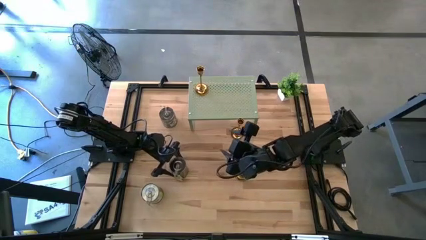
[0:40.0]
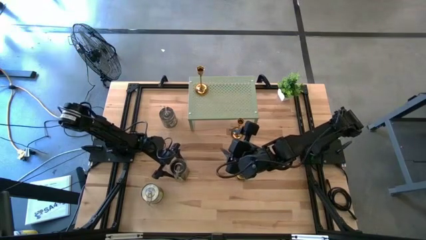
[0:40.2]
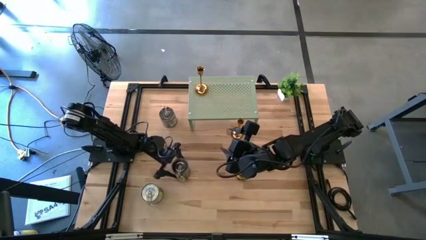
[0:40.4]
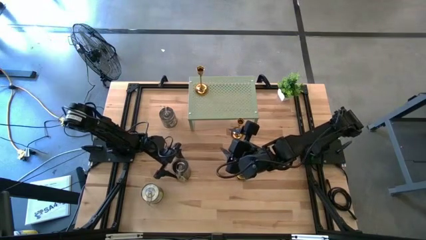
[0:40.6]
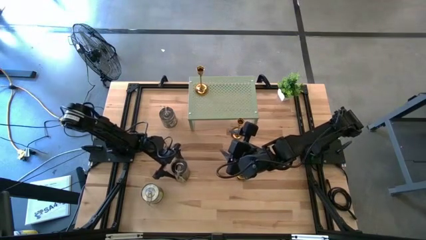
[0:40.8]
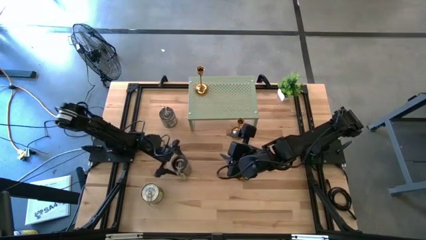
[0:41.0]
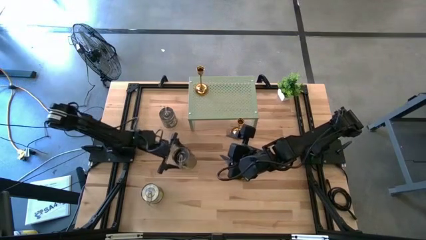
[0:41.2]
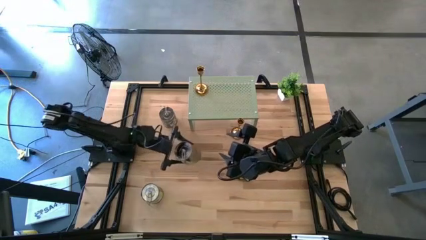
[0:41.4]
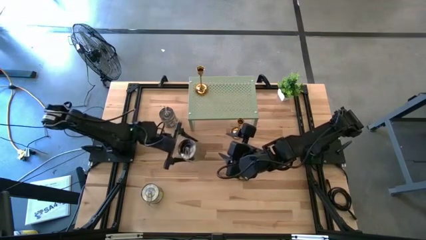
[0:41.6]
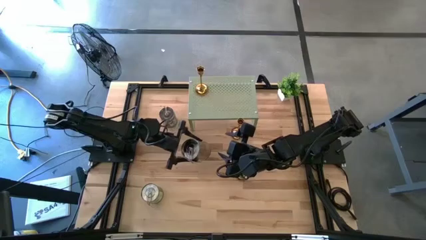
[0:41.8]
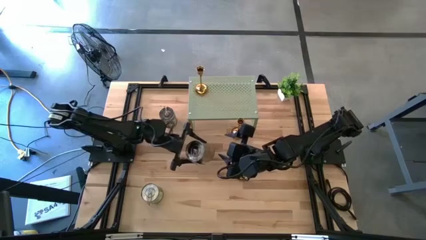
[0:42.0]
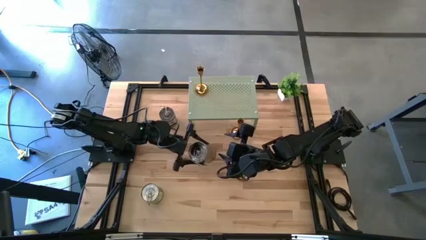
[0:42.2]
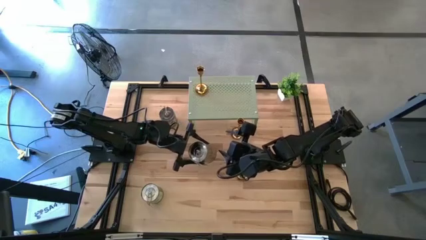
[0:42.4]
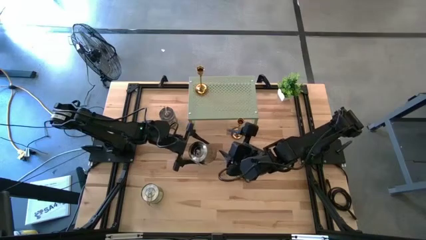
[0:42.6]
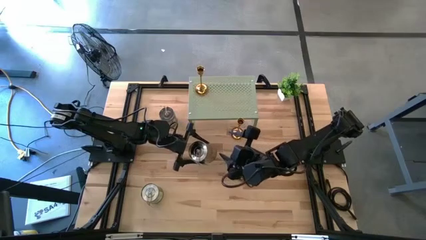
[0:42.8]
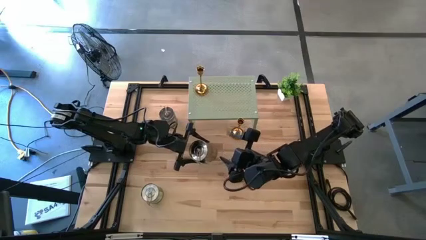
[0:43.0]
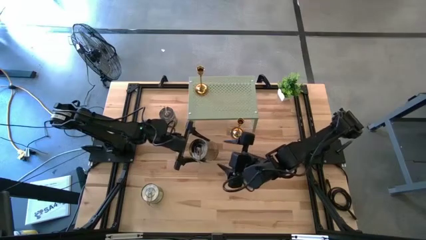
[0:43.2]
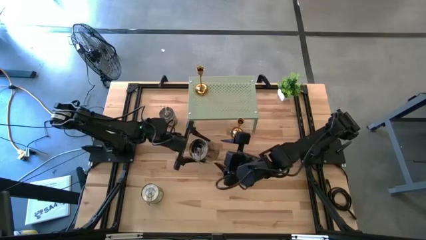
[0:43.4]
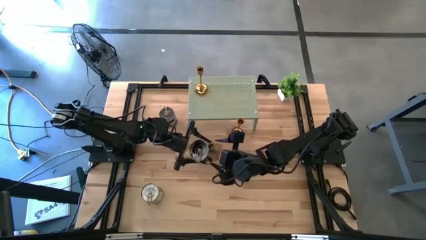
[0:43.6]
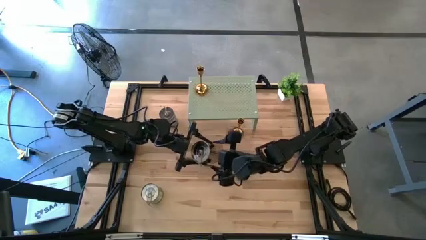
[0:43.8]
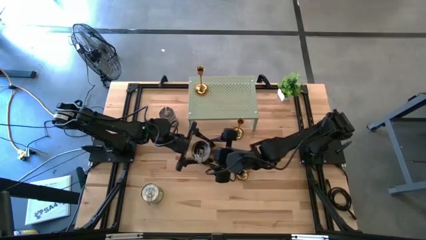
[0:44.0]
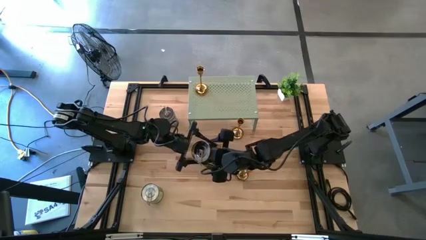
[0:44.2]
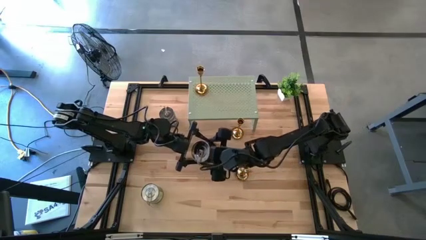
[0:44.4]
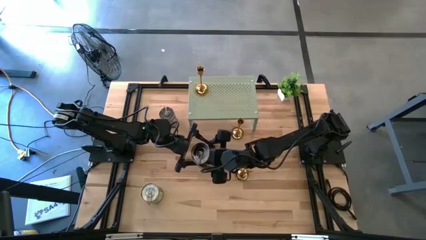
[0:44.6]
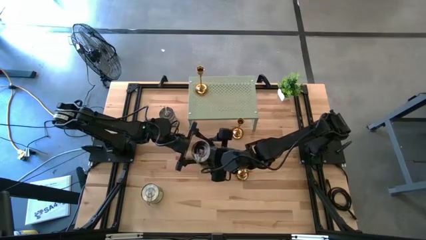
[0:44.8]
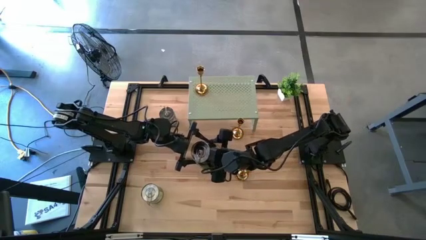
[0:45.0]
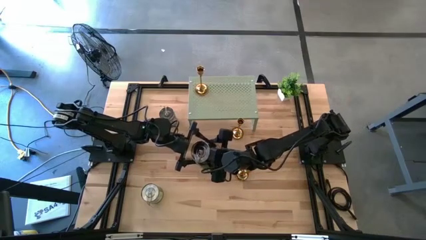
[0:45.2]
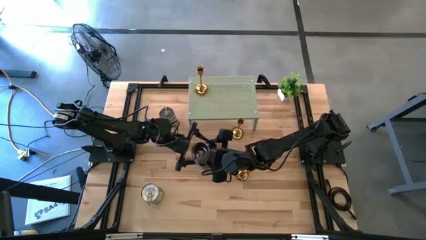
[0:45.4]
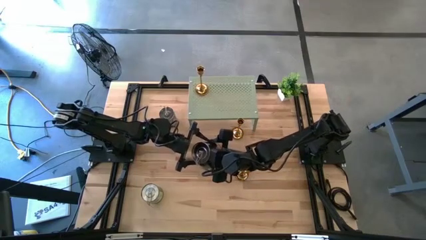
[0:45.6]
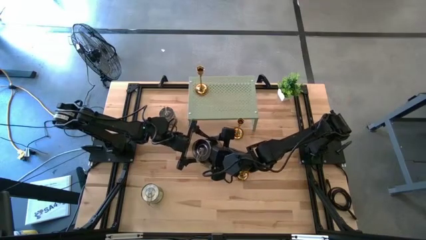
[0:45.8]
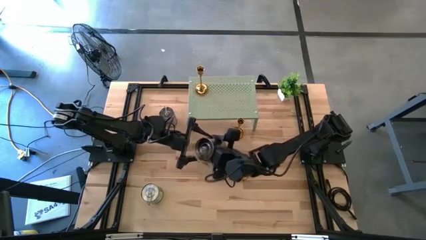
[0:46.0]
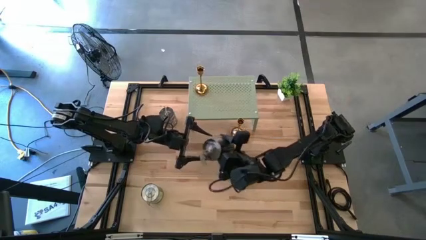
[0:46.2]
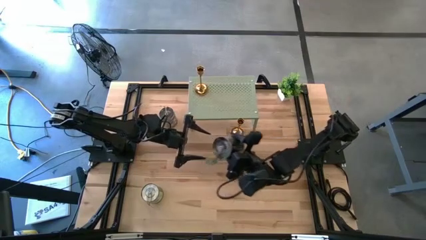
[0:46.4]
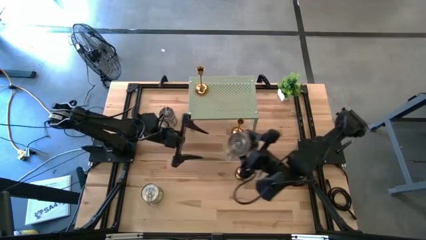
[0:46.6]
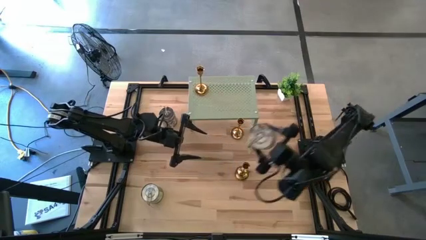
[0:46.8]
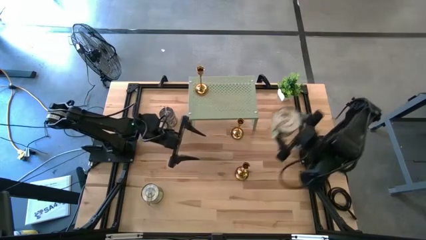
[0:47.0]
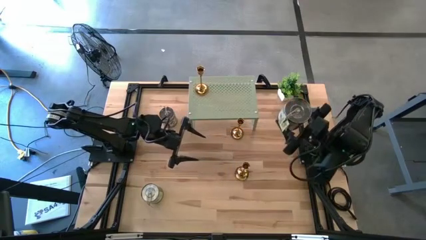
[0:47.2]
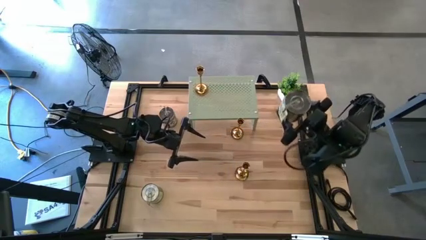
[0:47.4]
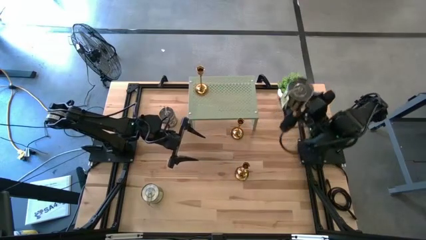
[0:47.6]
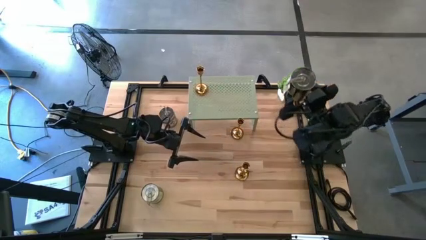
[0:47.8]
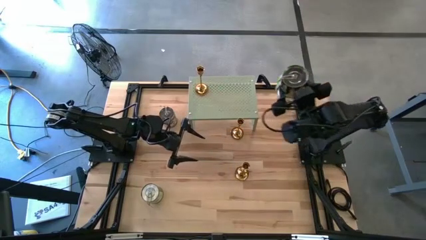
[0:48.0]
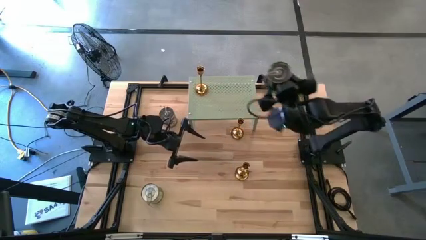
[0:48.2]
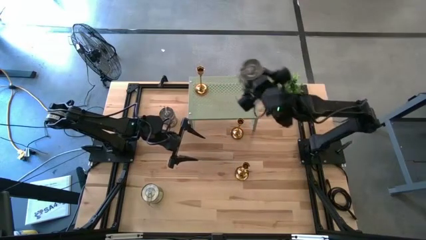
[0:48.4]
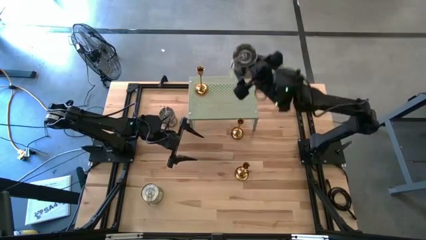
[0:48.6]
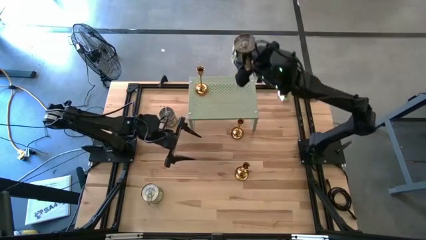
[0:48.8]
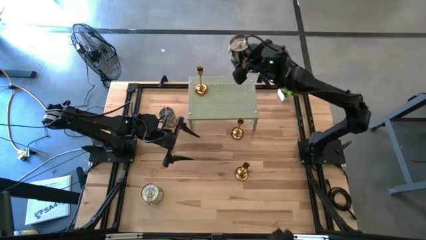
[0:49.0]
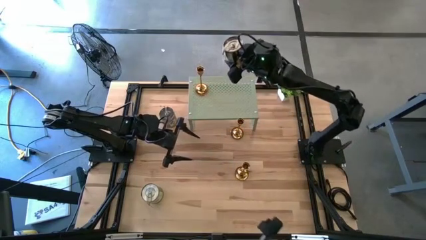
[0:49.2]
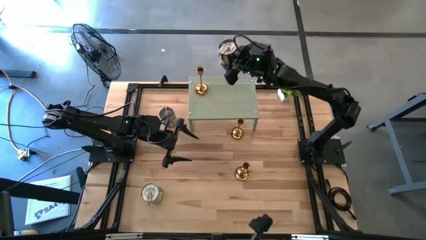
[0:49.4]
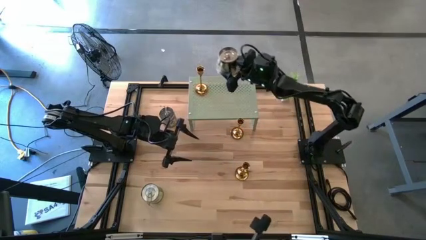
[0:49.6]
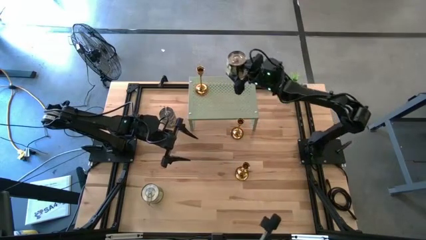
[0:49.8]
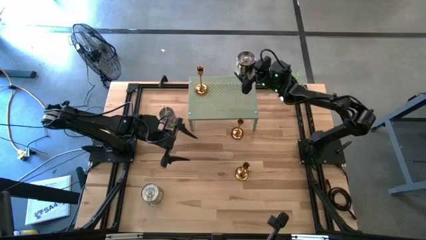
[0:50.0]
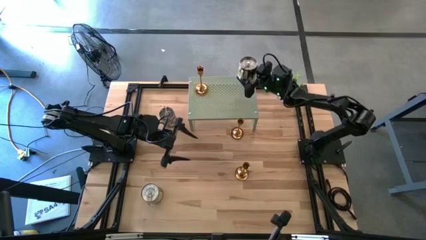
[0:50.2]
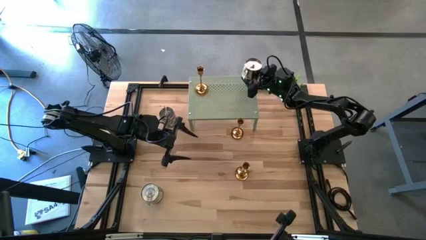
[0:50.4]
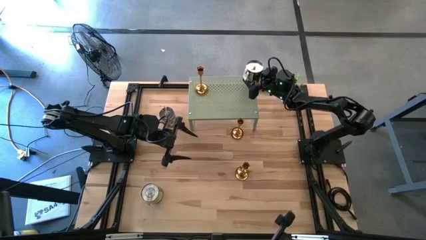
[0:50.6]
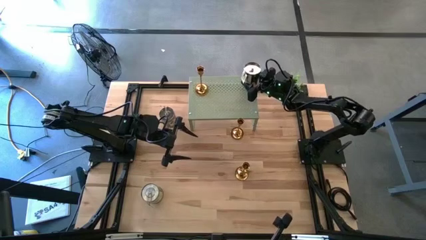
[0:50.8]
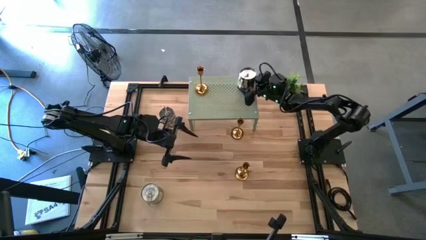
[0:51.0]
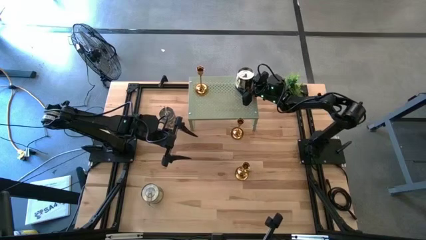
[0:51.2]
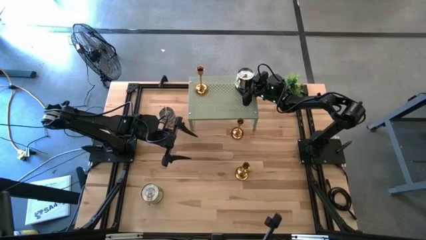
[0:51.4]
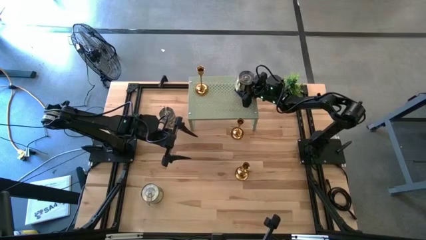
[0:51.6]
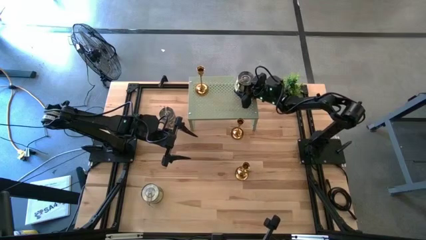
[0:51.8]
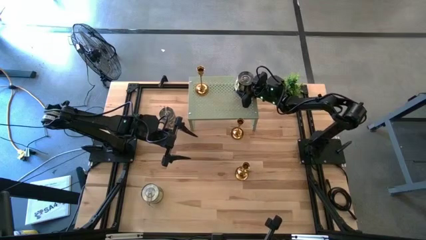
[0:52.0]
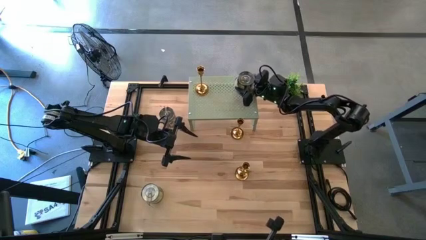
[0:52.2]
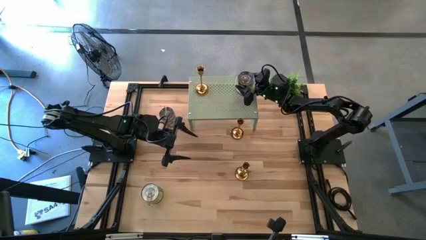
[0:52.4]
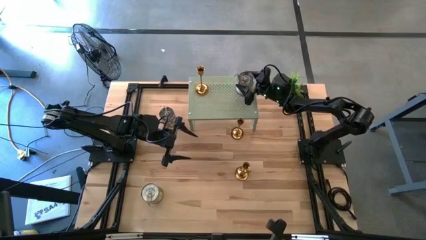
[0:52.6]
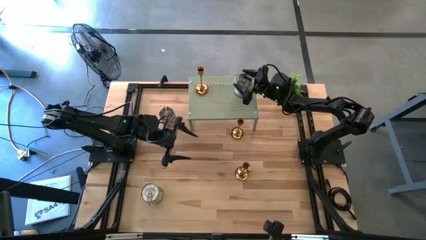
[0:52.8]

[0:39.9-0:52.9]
Task: Pick & Place candle stick holders
Put the middle right silver scented candle on the shelf

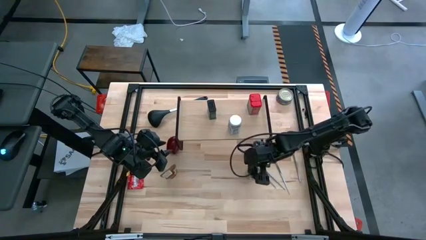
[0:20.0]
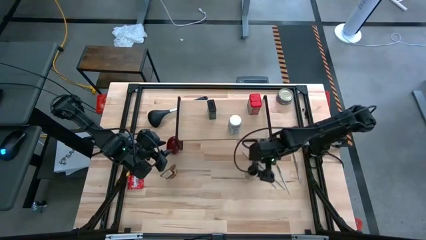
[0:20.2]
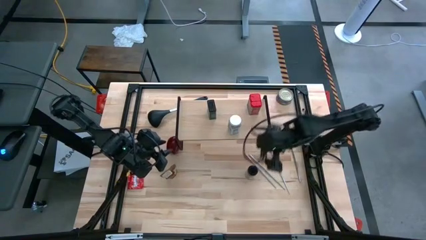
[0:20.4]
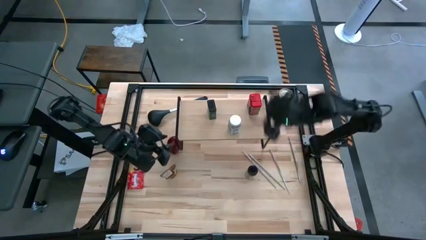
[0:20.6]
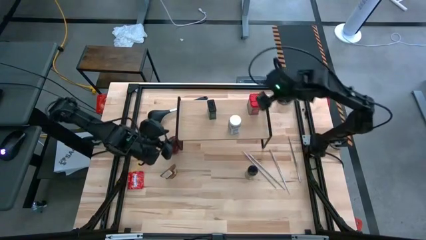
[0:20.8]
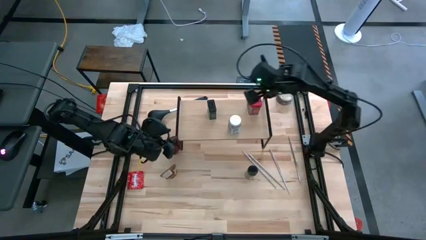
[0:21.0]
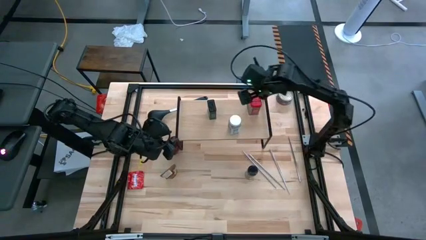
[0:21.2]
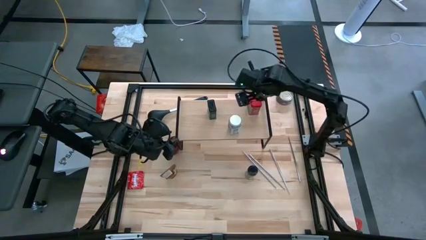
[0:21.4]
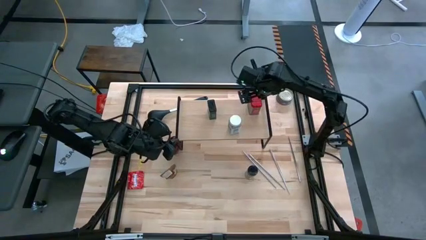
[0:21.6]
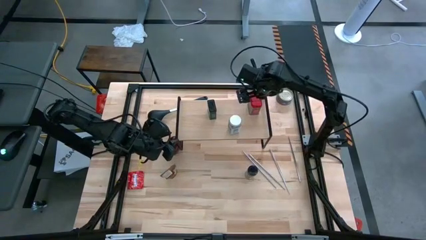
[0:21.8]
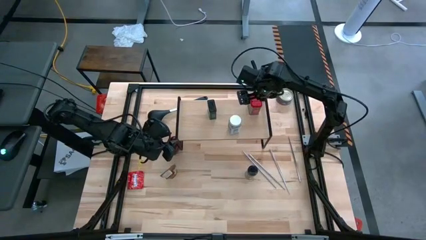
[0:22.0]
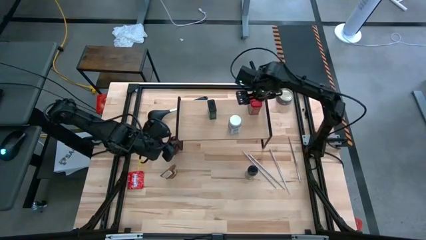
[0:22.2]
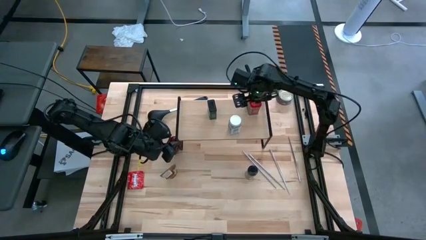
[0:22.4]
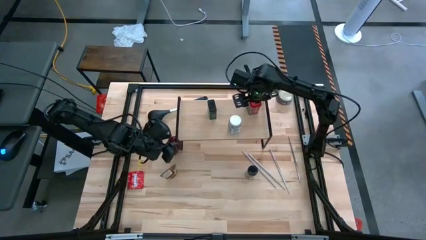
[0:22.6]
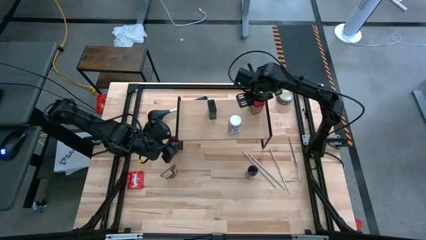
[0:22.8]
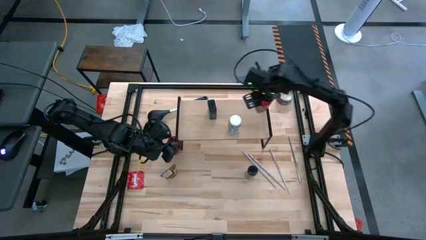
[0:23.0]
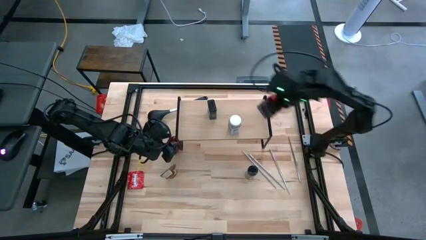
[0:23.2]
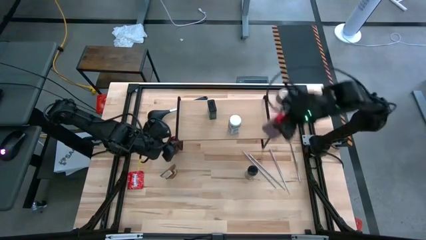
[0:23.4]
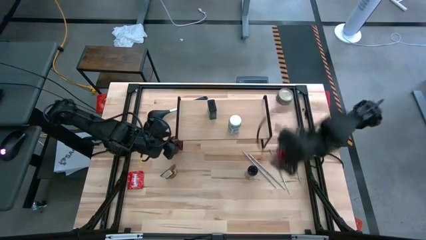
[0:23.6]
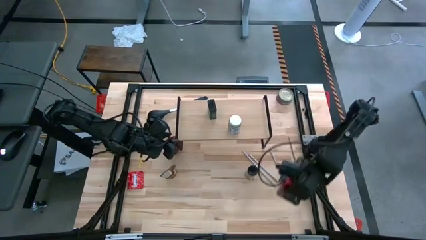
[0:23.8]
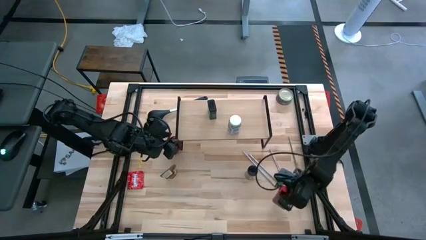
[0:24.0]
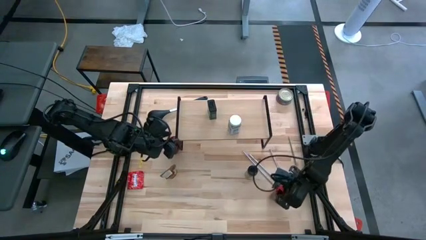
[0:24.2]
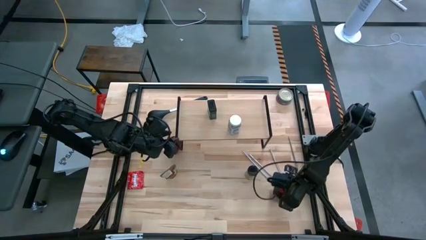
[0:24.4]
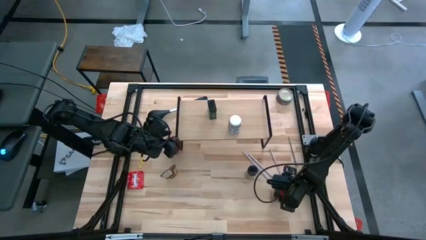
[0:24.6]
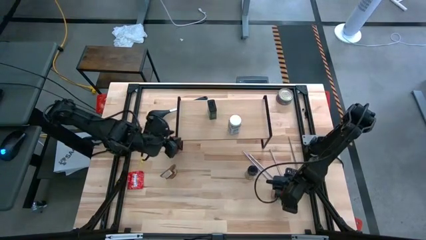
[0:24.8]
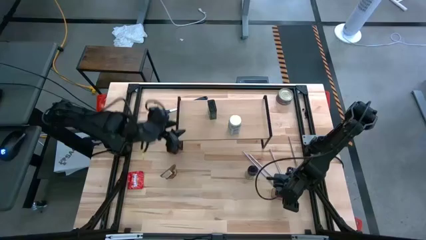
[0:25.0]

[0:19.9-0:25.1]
Task: Shelf spices
Remove the red seasoning can from the shelf
